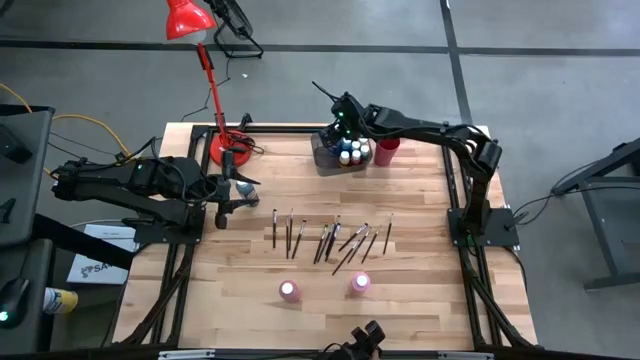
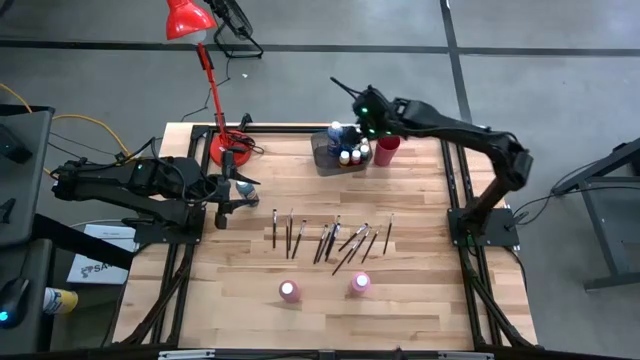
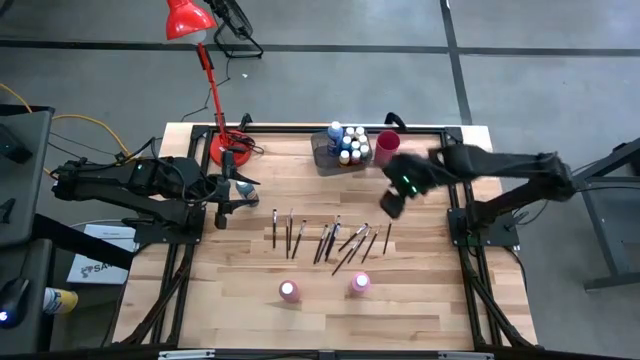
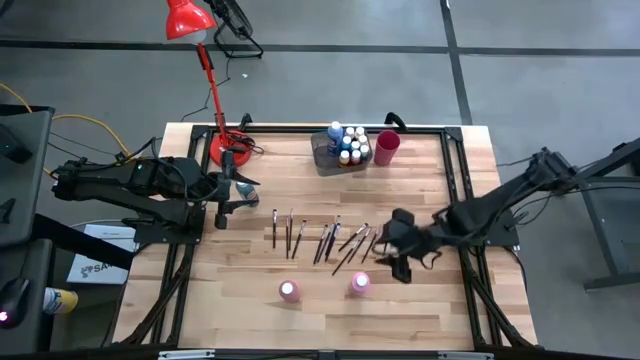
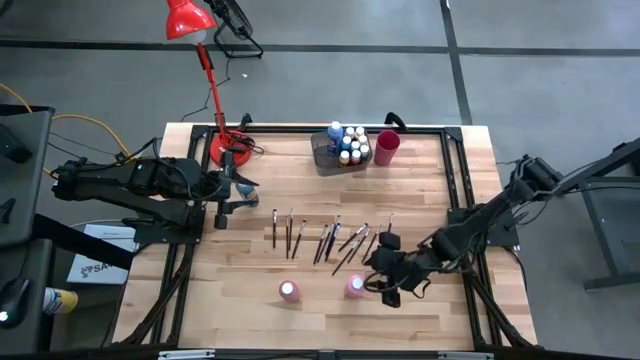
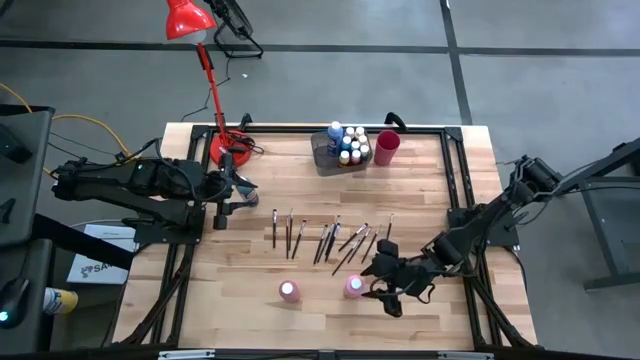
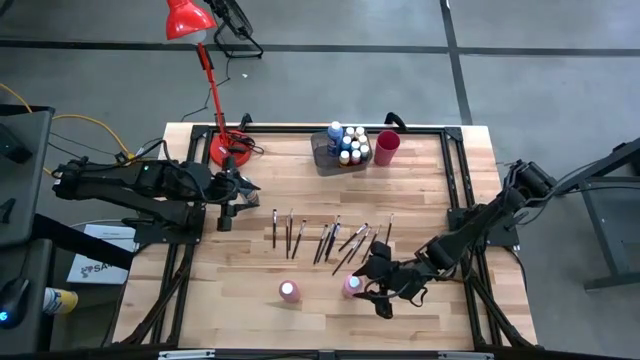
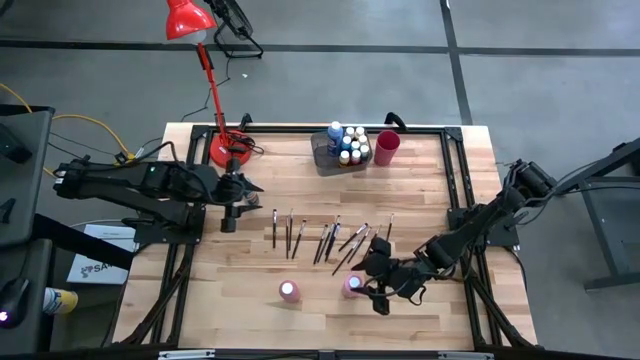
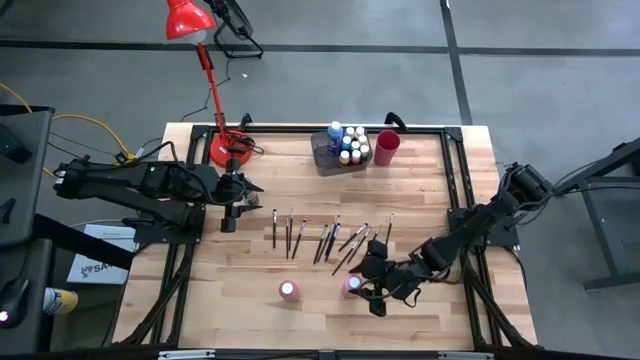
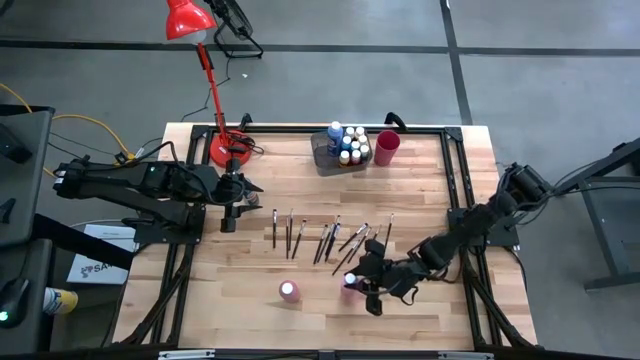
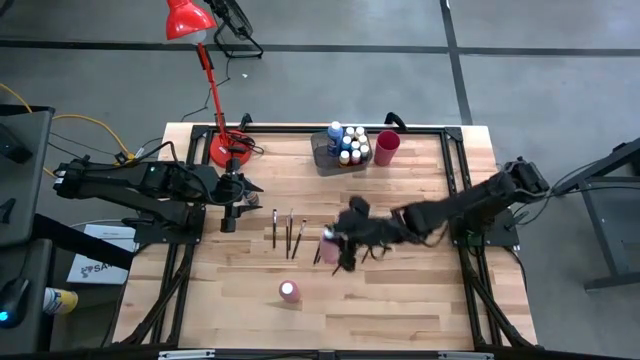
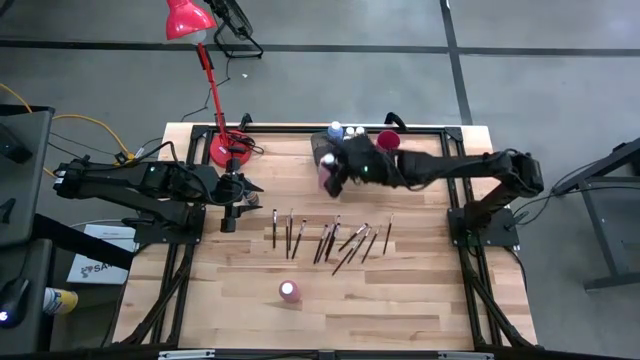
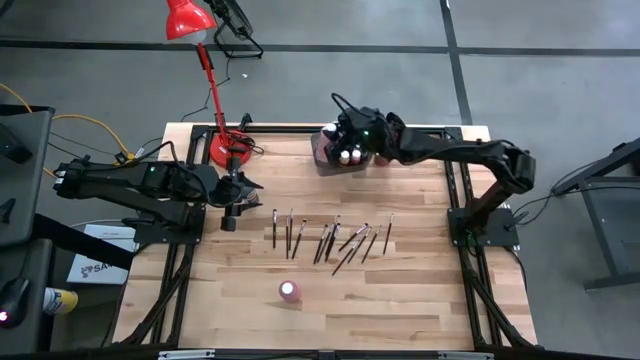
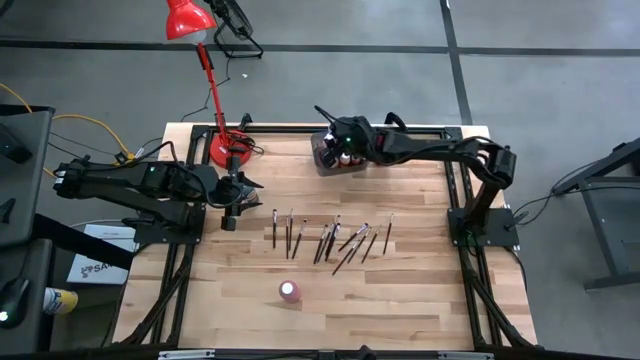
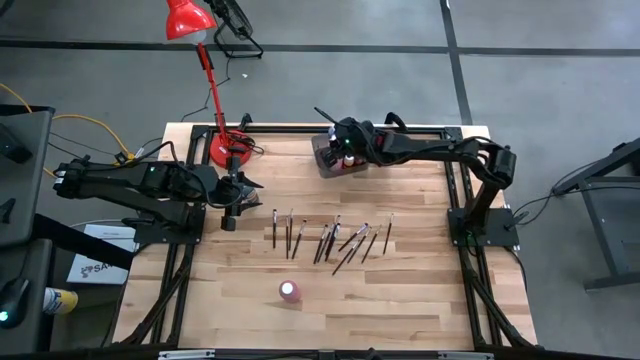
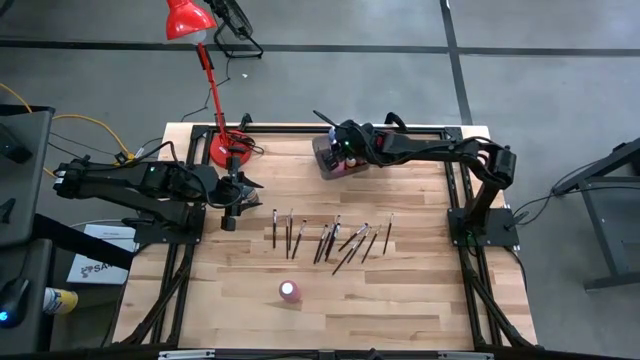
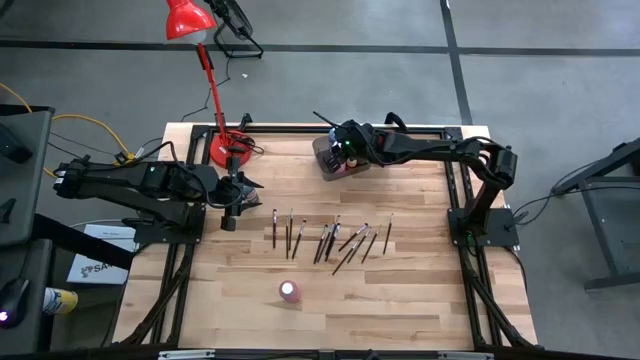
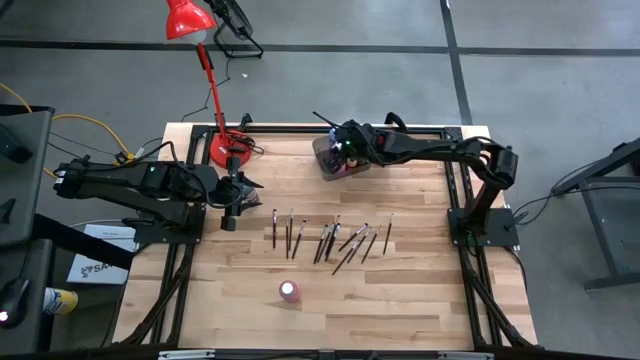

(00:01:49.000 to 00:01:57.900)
Task: Pick & Place Paint Supplies
Put the large pink paint bottle into the black bin

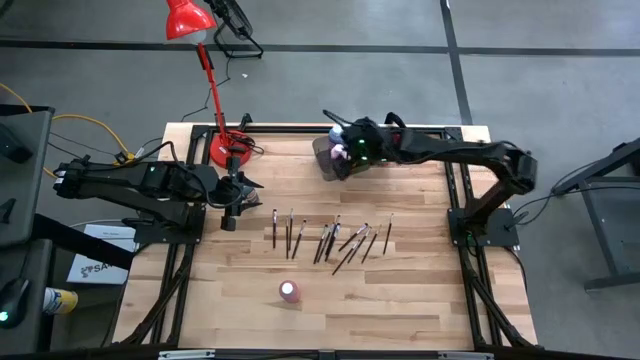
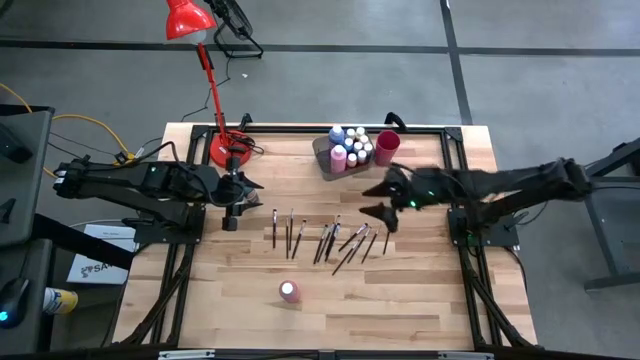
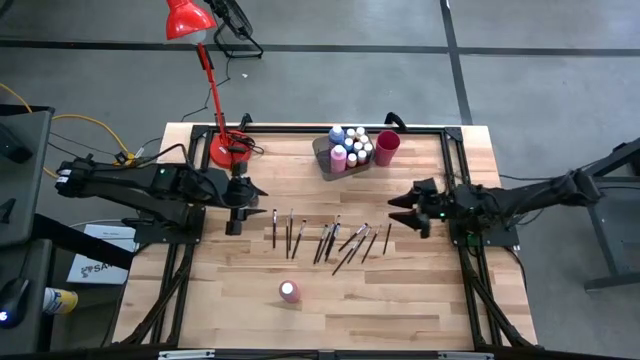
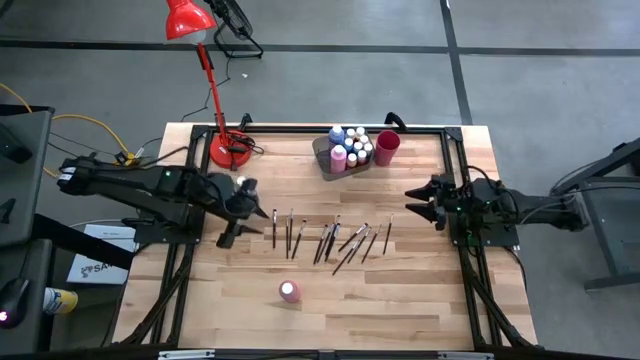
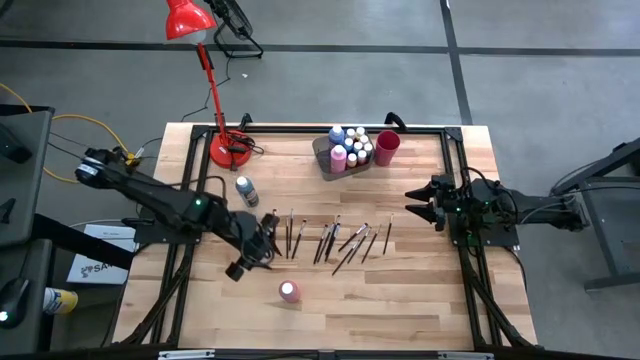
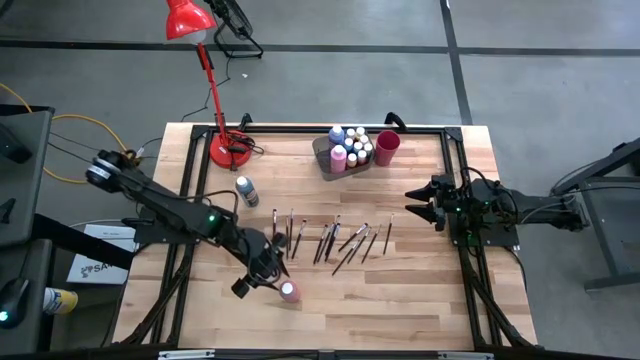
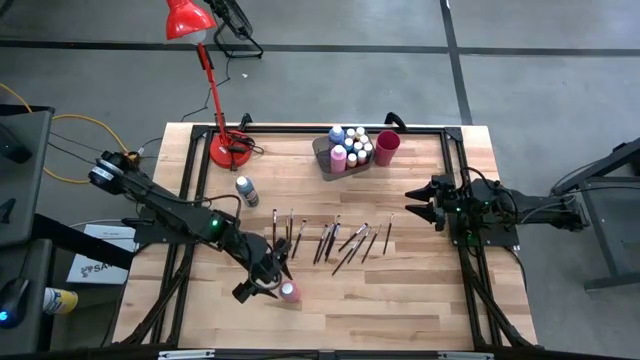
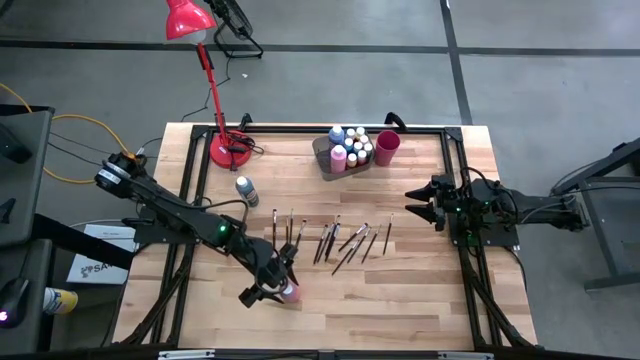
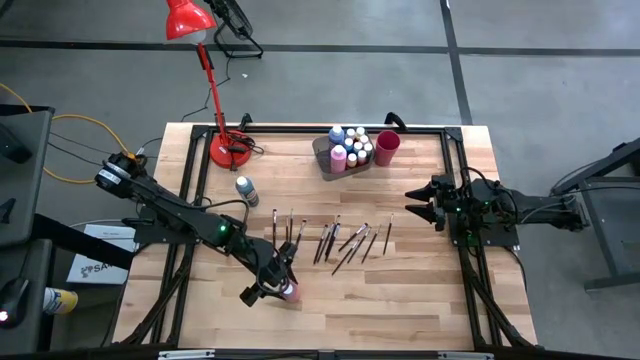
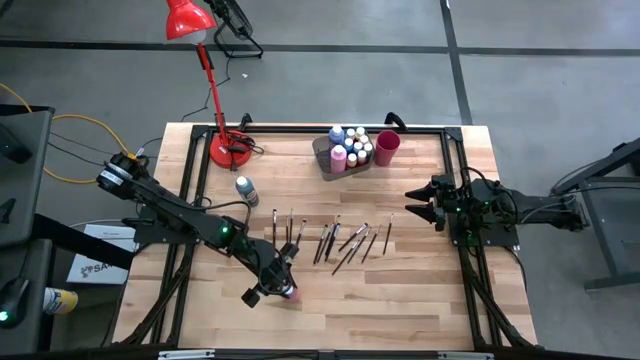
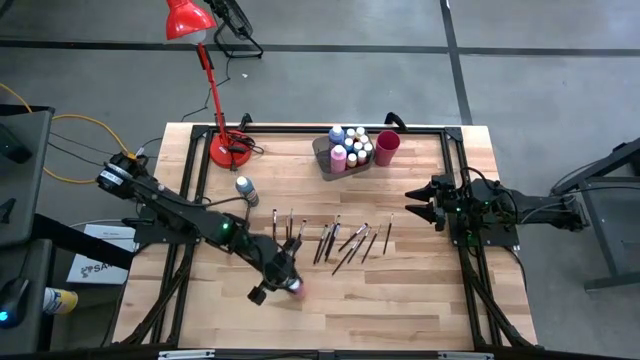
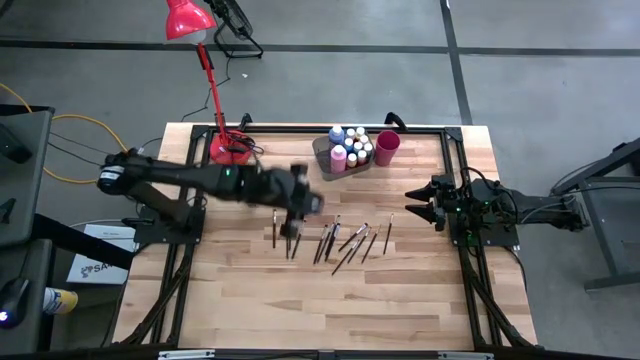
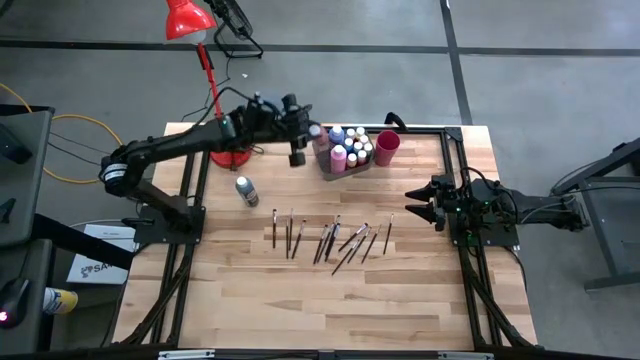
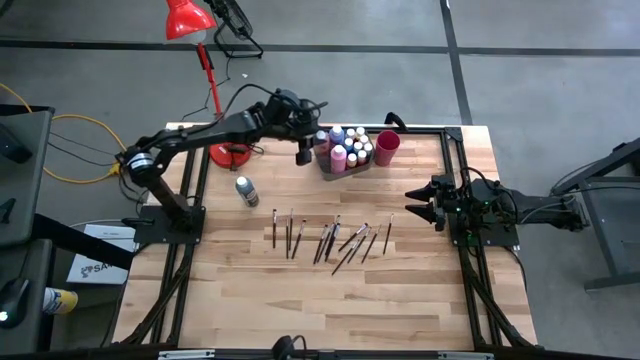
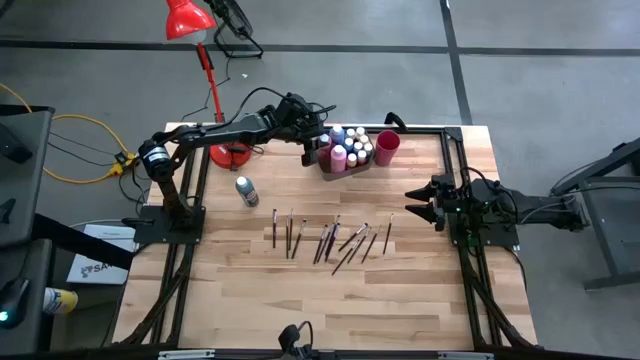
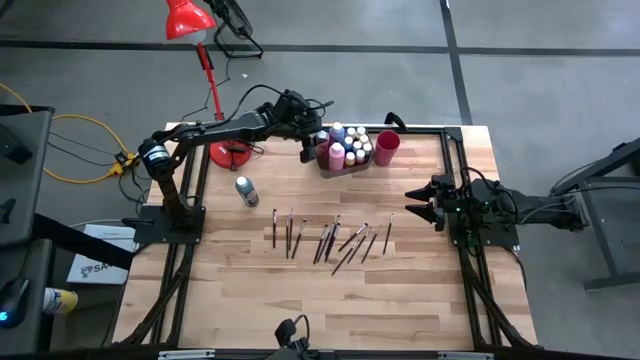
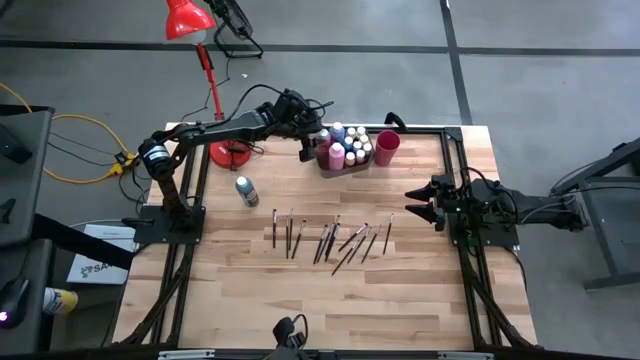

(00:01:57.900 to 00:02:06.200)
Put the large red paint bottle into the black bin

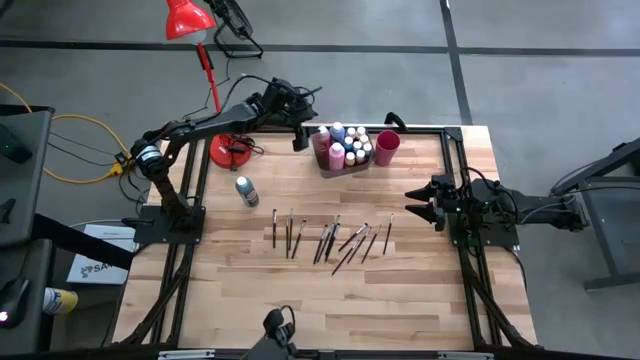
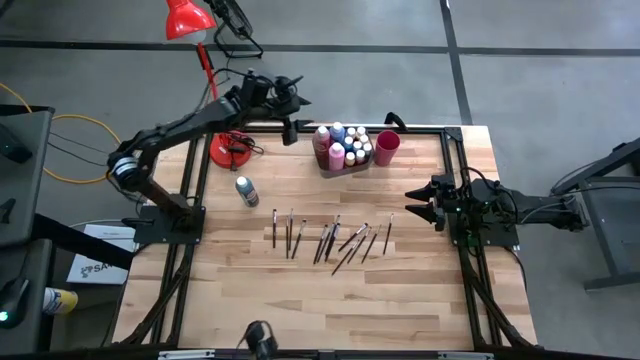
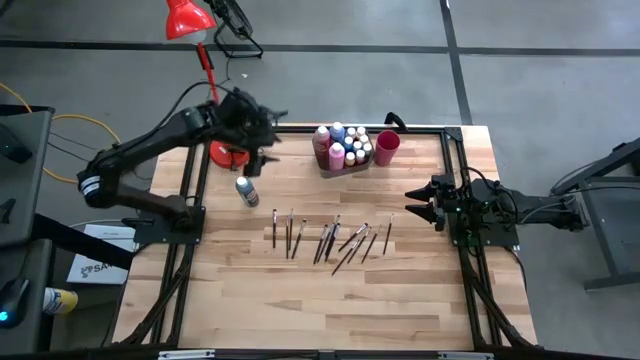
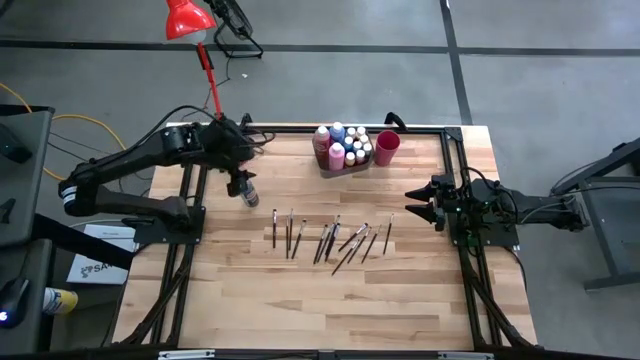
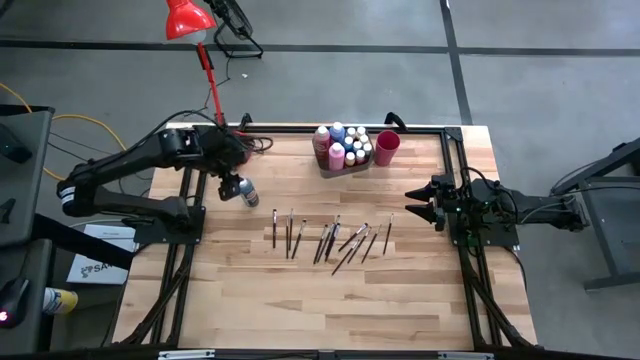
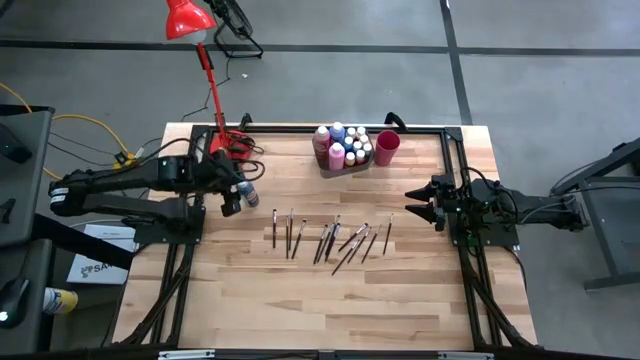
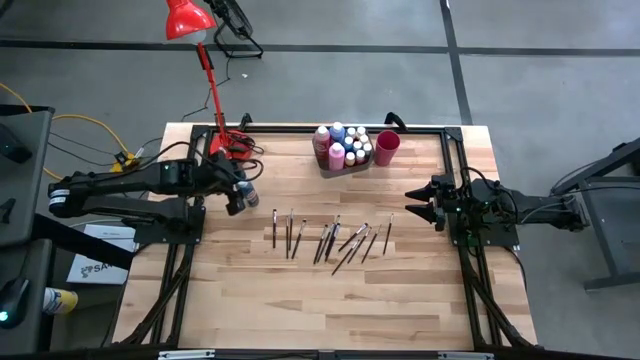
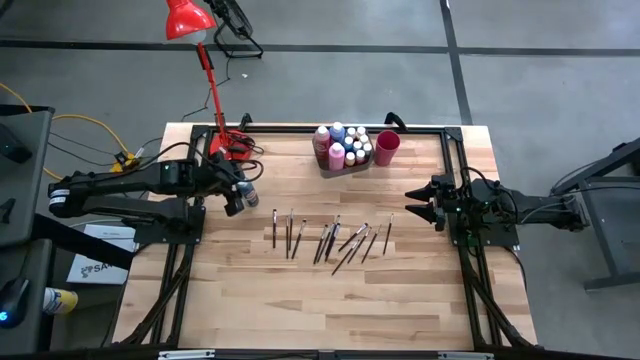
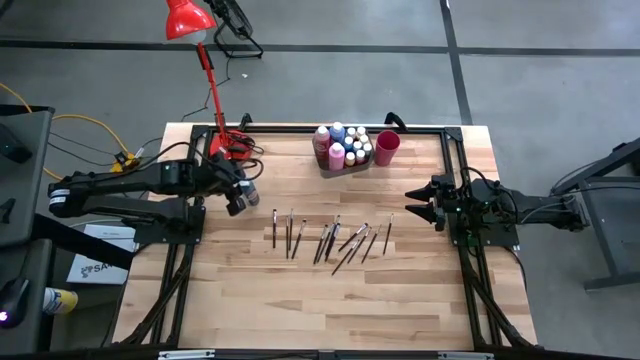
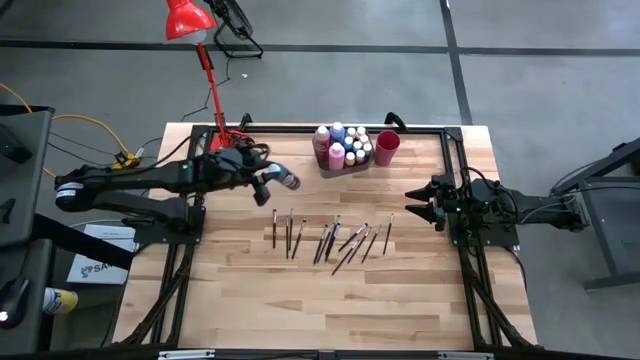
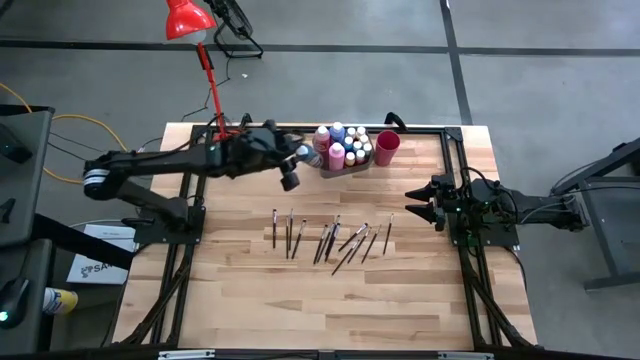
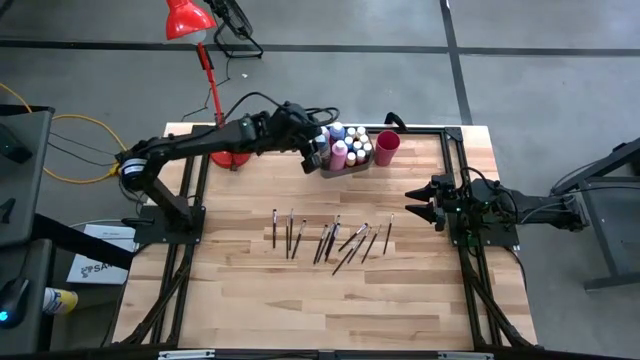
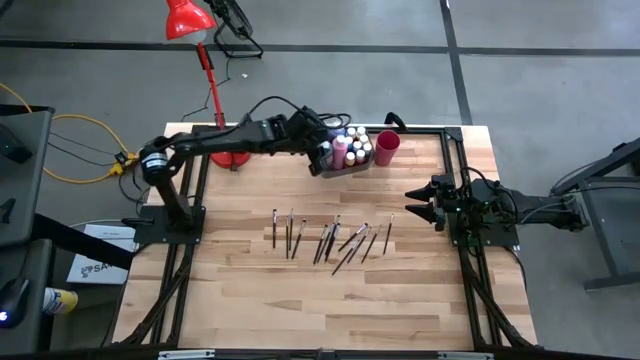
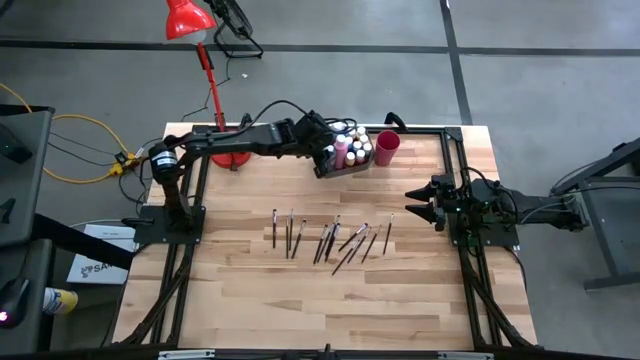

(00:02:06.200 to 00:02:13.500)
Put the black paint bottle into the black bin
